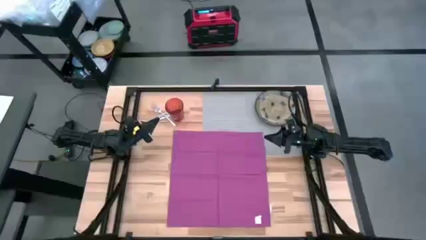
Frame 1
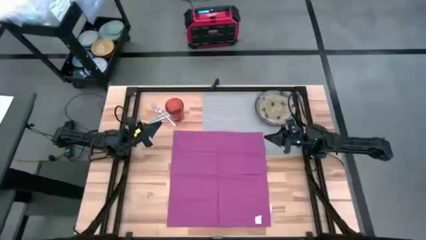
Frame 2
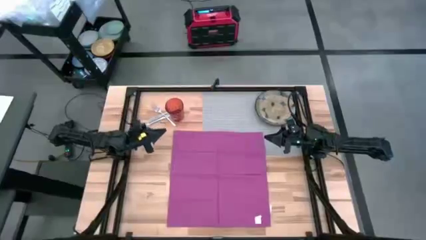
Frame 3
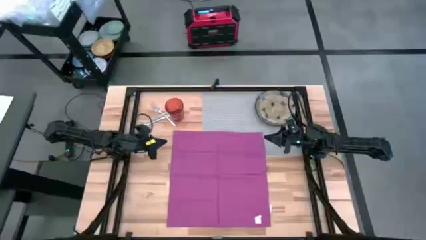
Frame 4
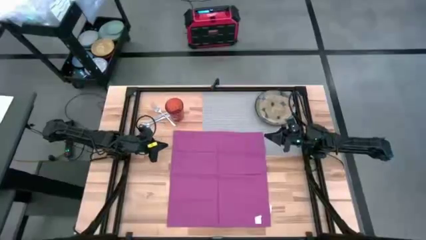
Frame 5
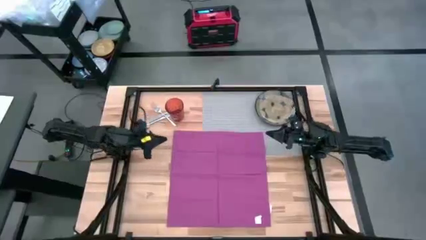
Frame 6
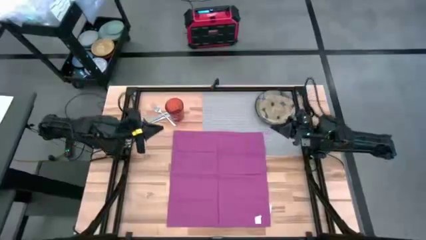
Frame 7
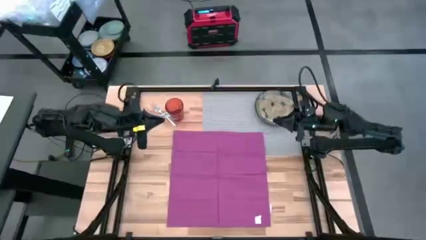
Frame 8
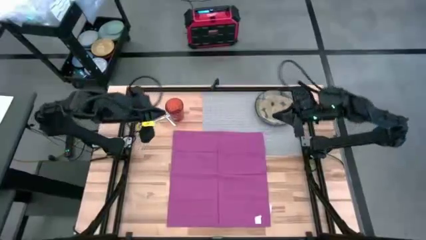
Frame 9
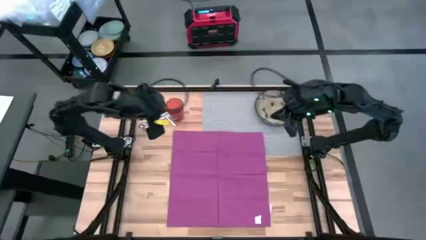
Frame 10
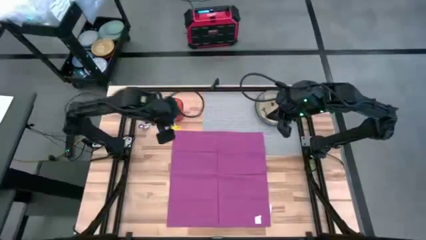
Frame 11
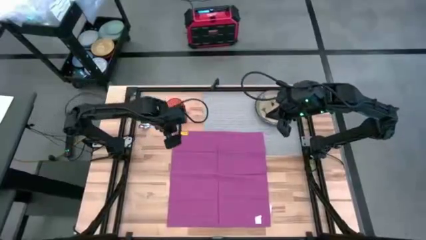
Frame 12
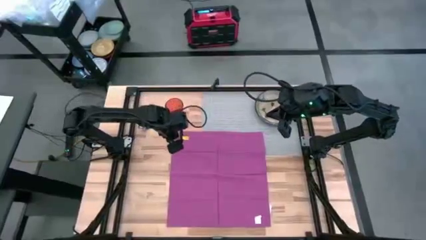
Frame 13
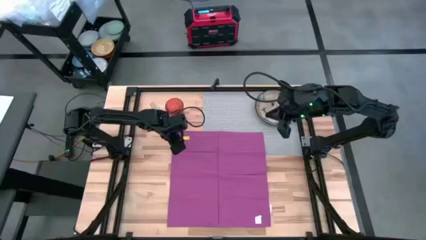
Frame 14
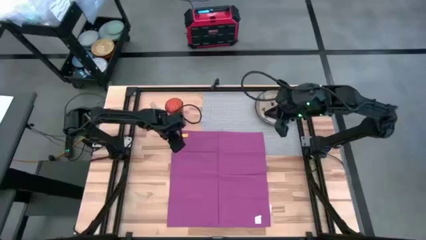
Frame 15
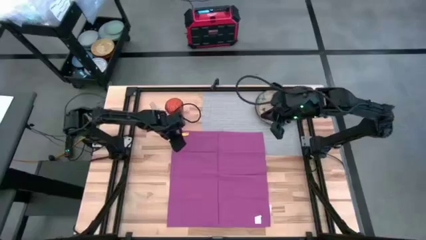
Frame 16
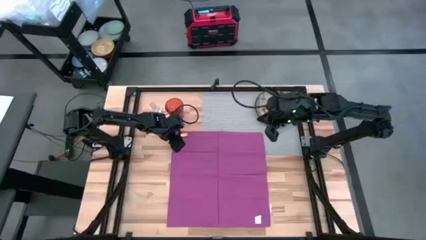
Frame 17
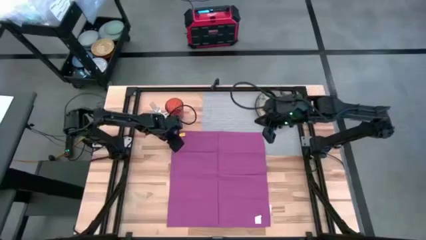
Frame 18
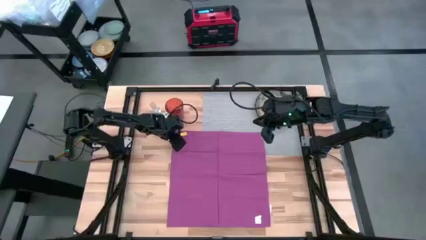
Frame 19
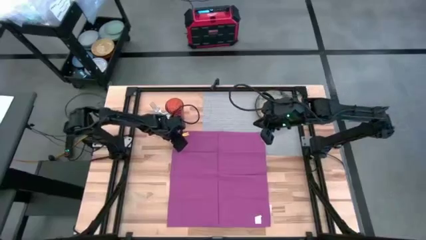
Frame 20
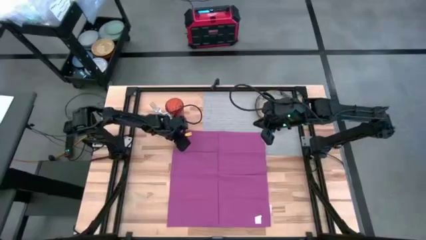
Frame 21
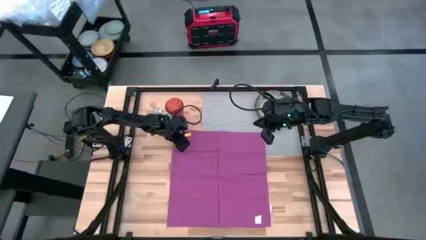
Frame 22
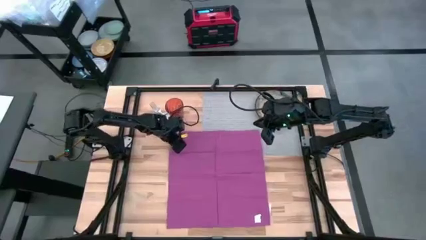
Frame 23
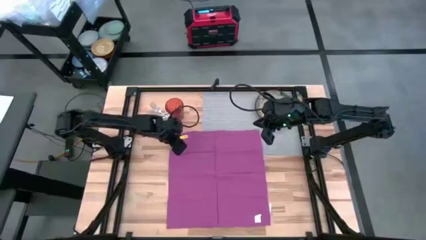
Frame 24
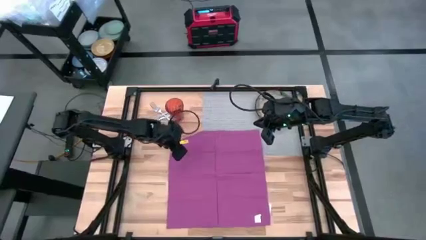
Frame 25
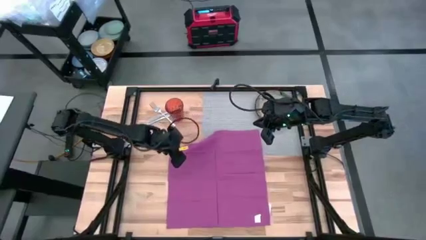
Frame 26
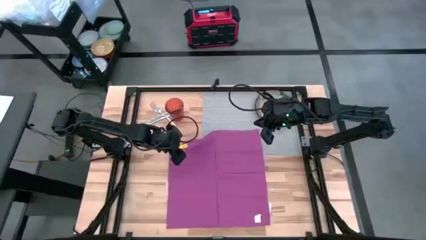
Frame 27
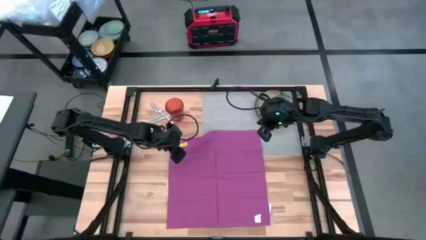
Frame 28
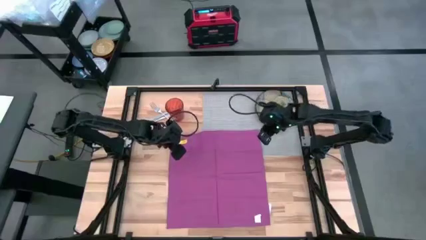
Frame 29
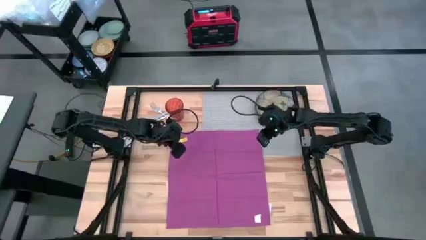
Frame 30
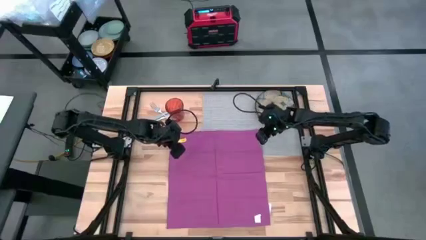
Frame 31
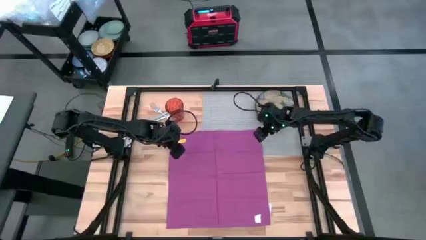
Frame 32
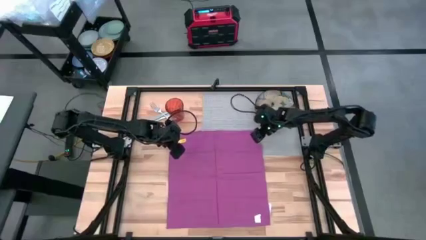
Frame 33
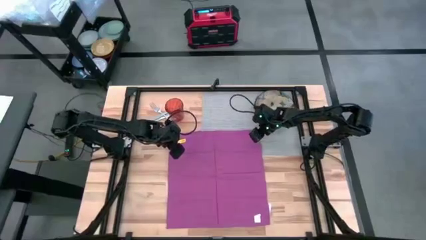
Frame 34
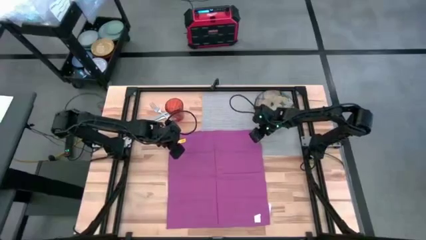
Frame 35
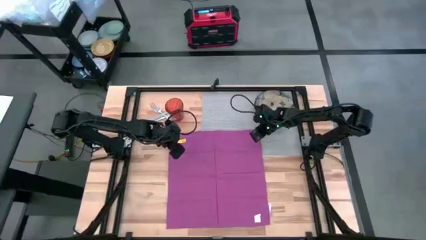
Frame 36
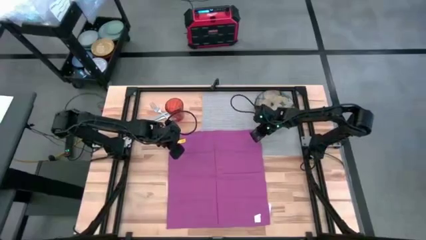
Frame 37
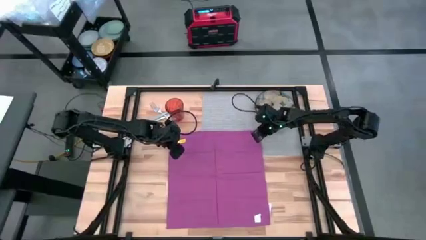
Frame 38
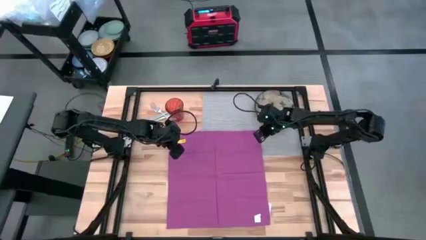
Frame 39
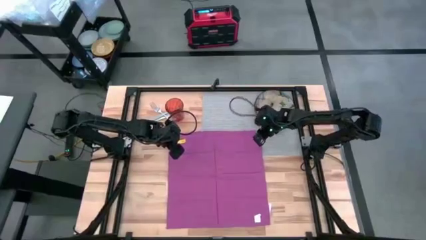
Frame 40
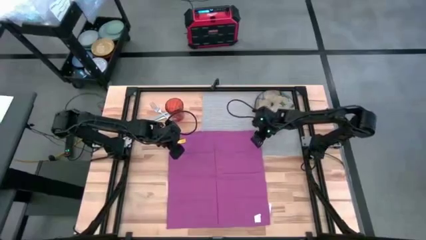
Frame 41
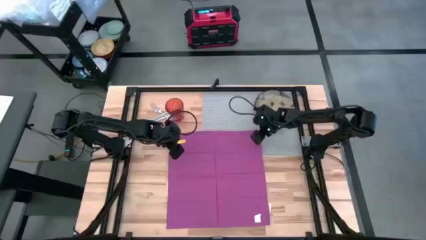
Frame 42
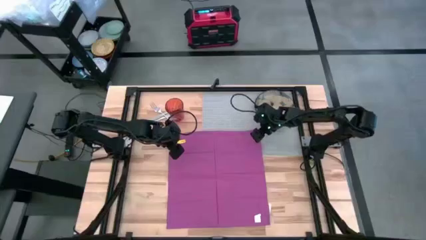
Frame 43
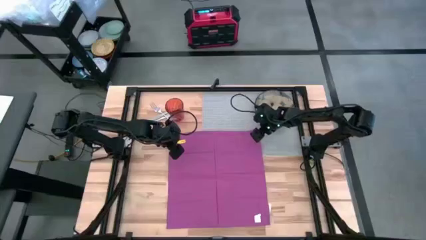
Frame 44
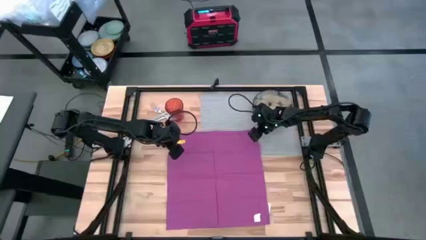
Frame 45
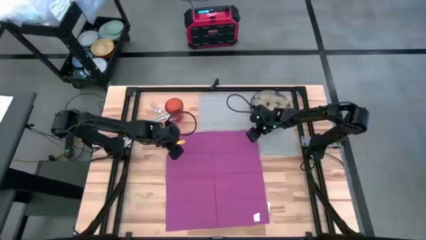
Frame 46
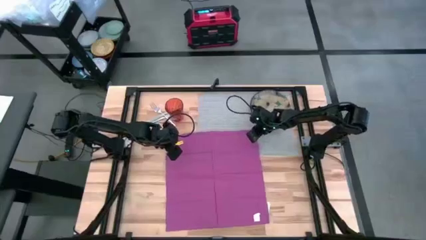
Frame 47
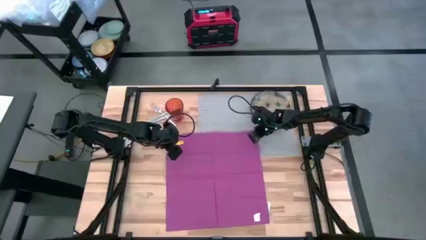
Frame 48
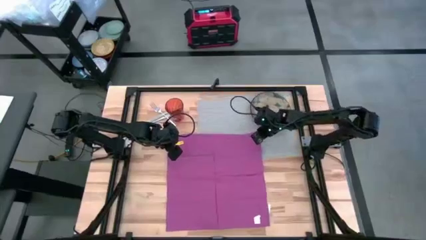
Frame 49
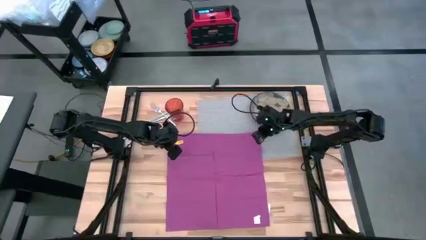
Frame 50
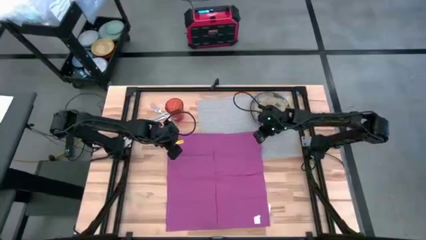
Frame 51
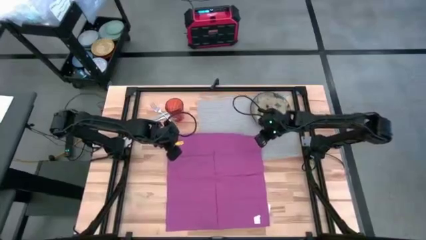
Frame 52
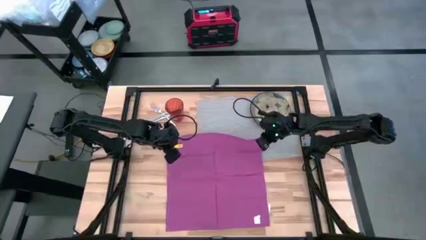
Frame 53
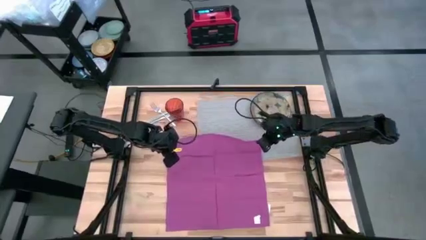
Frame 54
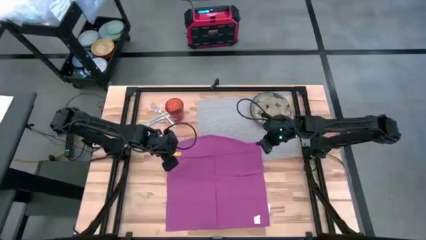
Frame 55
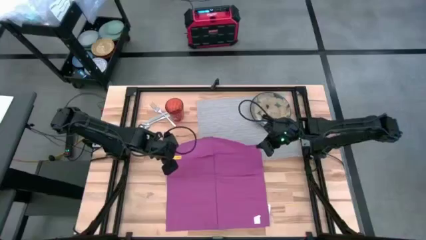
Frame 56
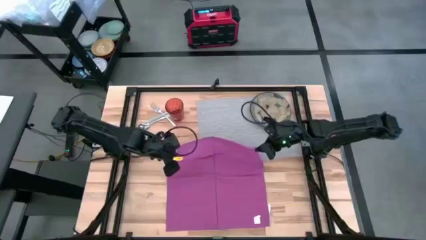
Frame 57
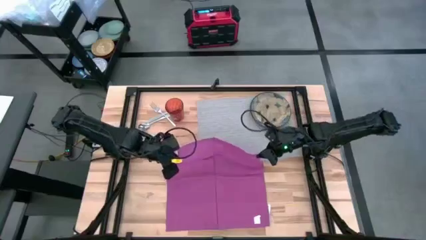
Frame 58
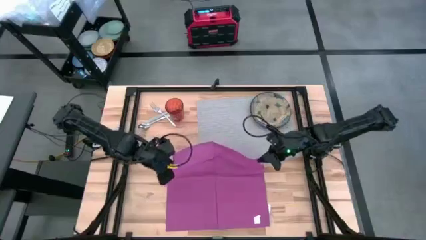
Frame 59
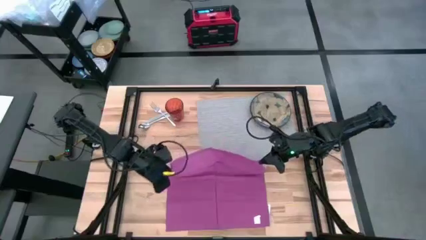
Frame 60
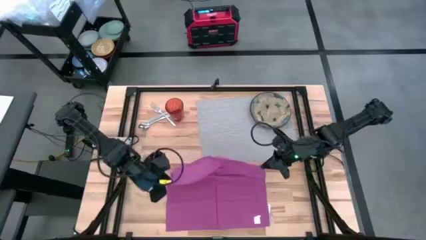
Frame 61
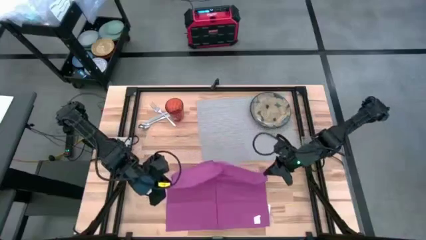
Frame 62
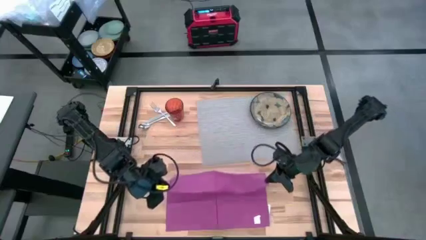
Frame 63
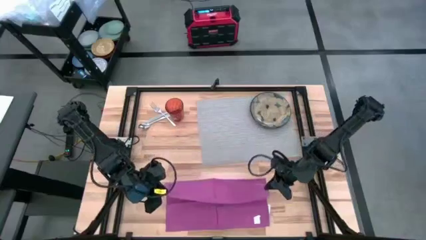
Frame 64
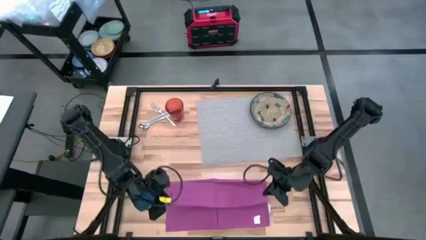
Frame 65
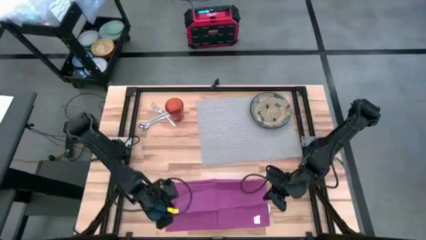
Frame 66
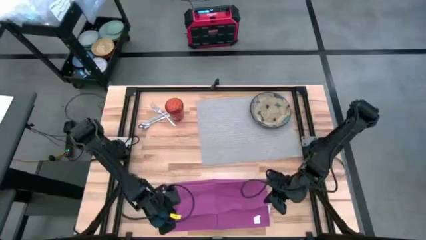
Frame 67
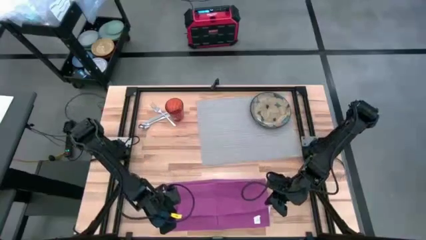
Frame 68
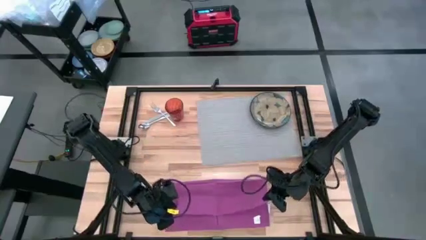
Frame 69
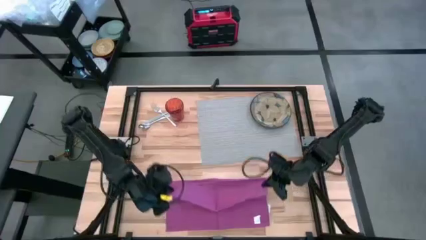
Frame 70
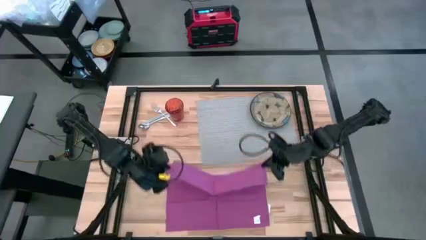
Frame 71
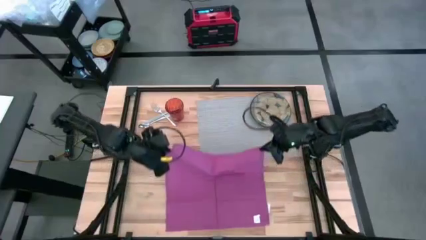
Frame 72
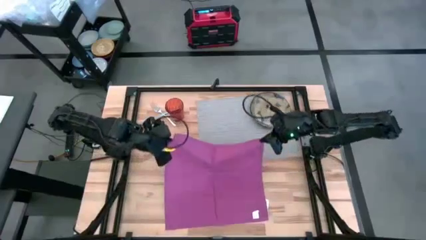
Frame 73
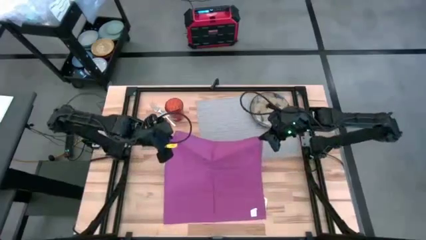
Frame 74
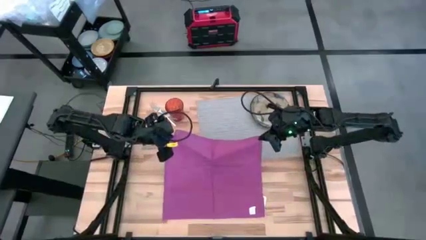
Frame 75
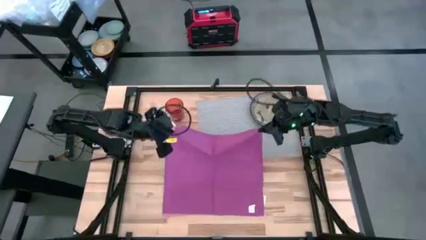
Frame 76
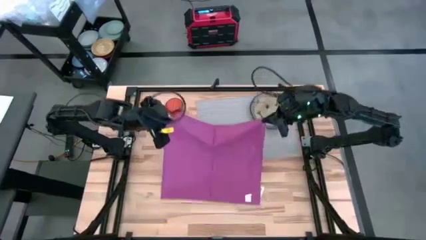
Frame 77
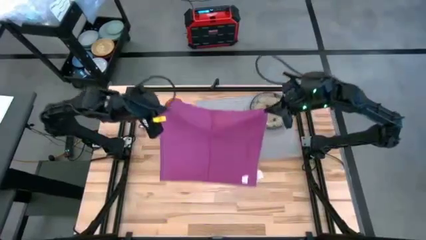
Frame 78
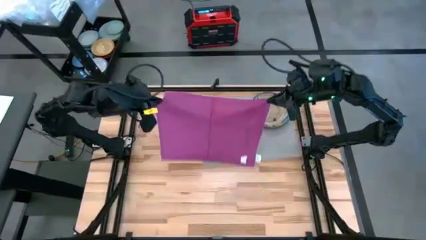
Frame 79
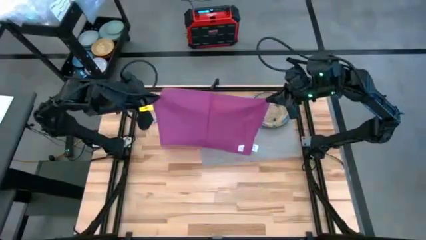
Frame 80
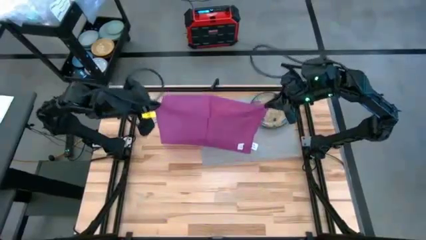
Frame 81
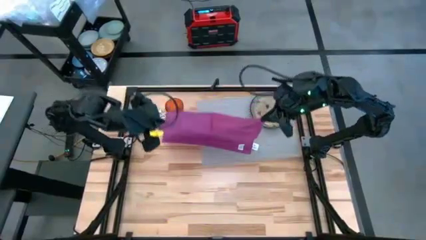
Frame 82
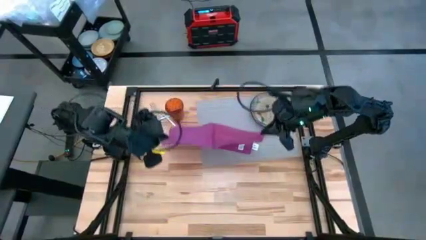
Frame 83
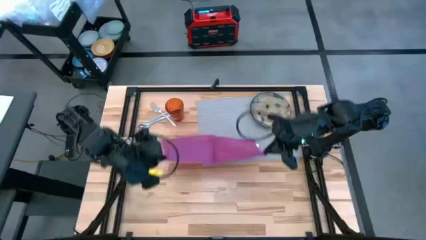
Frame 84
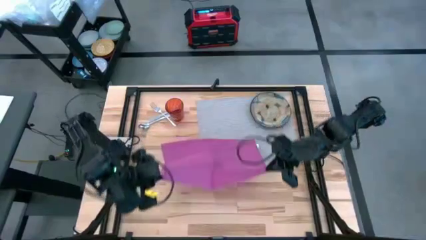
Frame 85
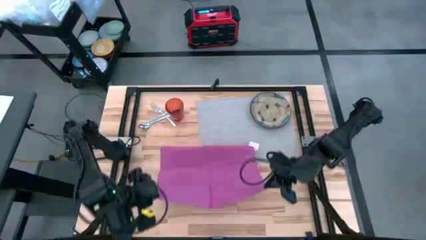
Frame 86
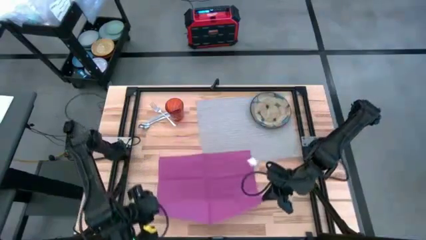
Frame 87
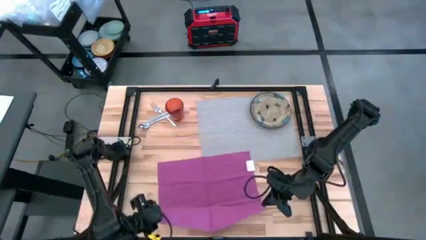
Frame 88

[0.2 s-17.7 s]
Task: Set table place
Fold the purple napkin
